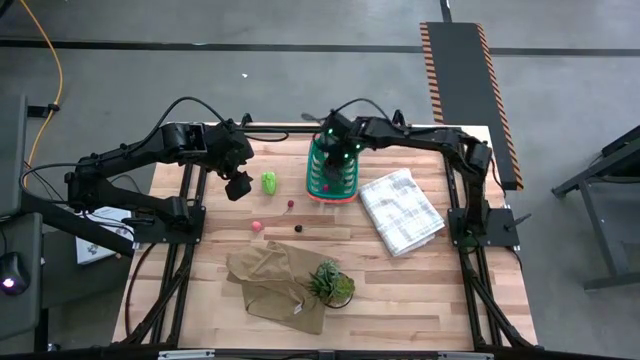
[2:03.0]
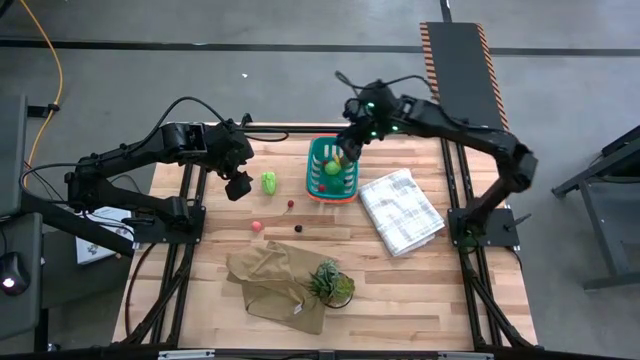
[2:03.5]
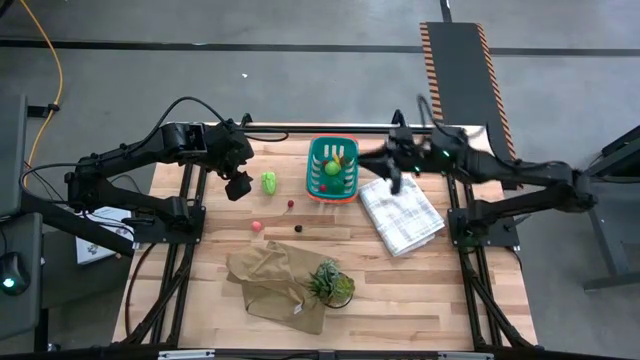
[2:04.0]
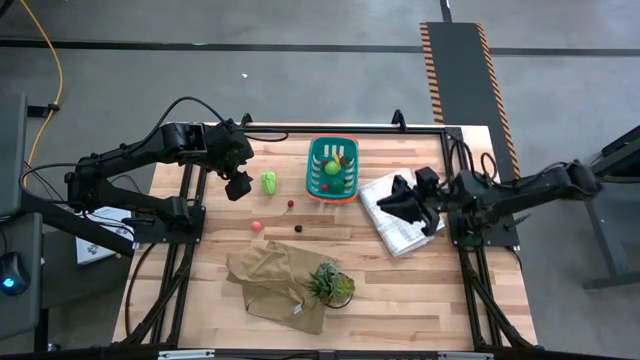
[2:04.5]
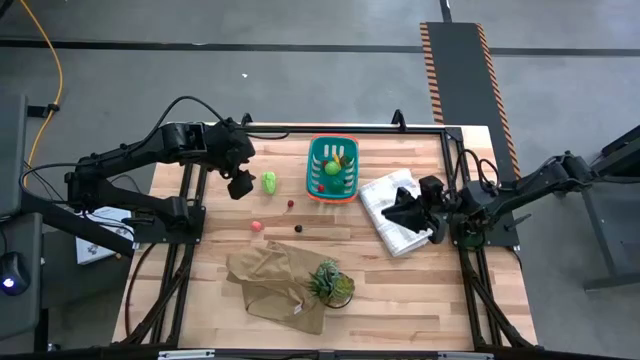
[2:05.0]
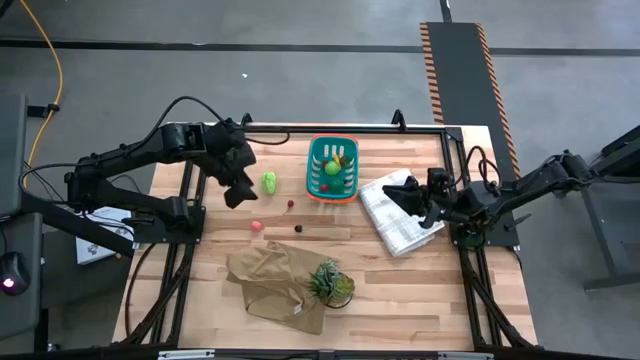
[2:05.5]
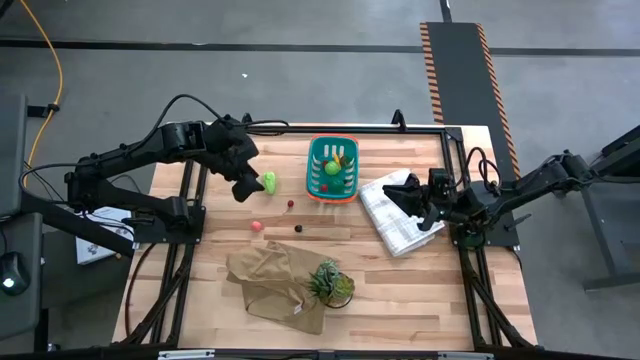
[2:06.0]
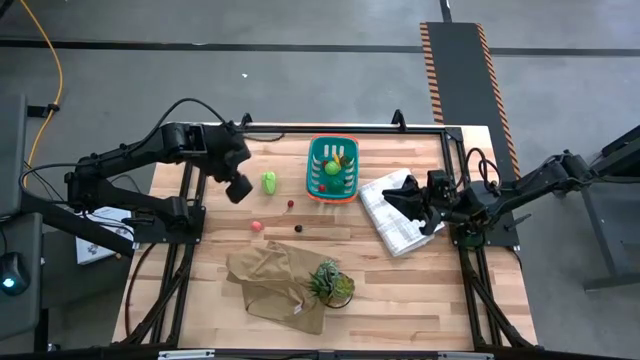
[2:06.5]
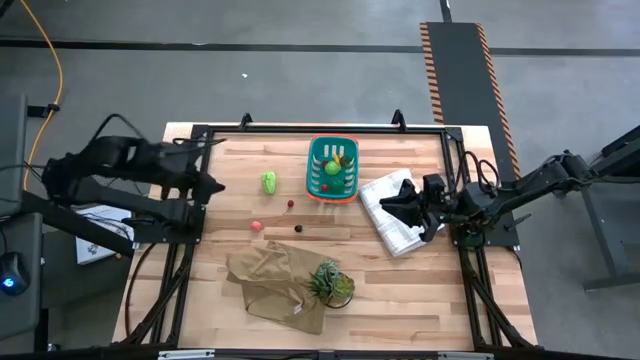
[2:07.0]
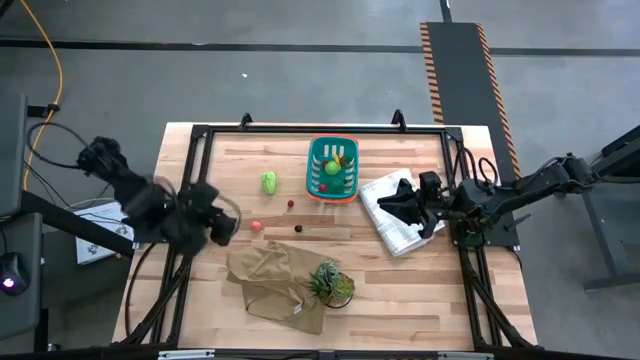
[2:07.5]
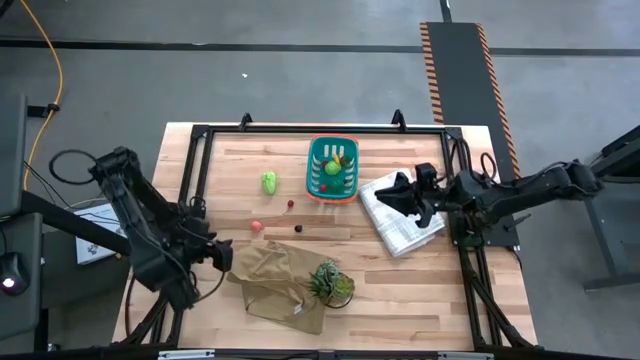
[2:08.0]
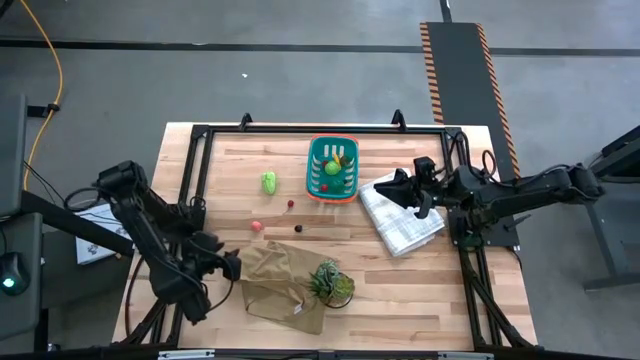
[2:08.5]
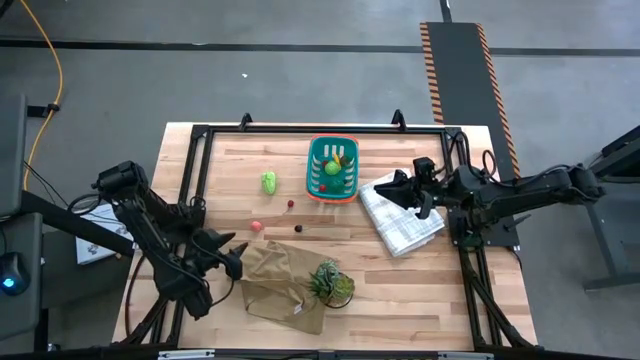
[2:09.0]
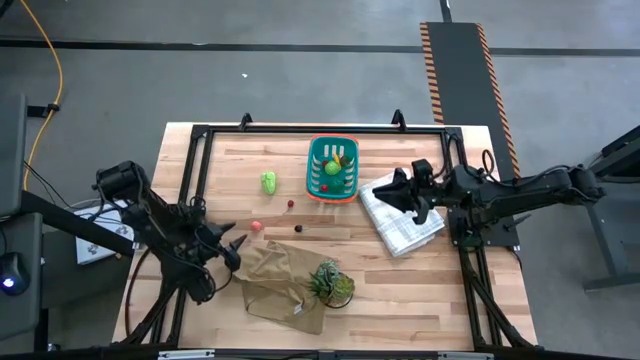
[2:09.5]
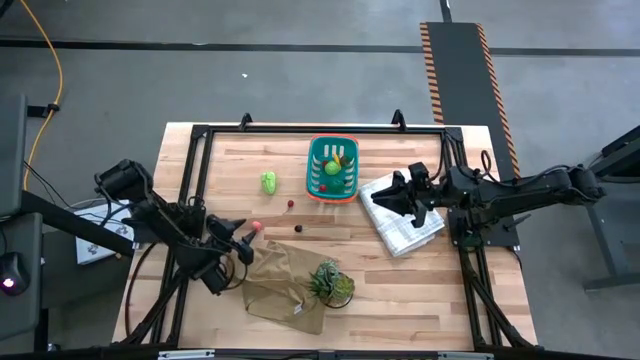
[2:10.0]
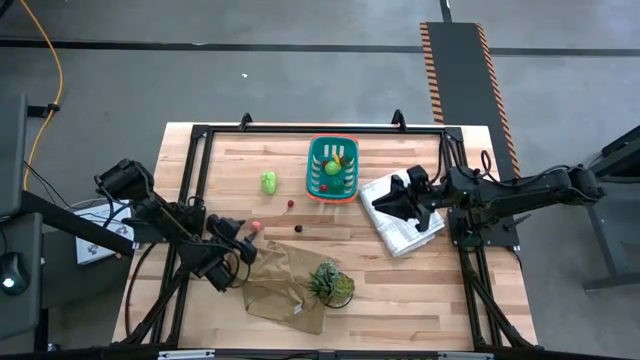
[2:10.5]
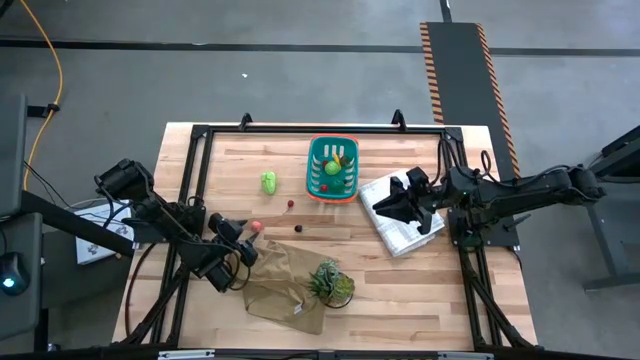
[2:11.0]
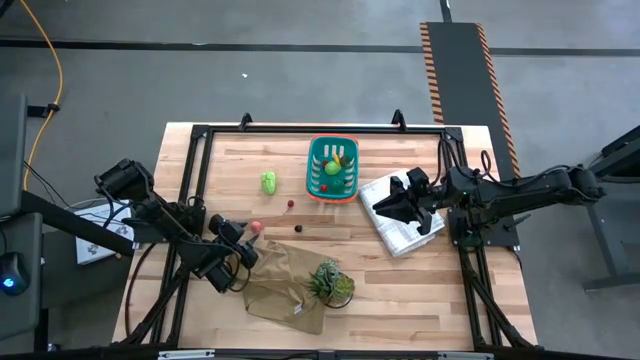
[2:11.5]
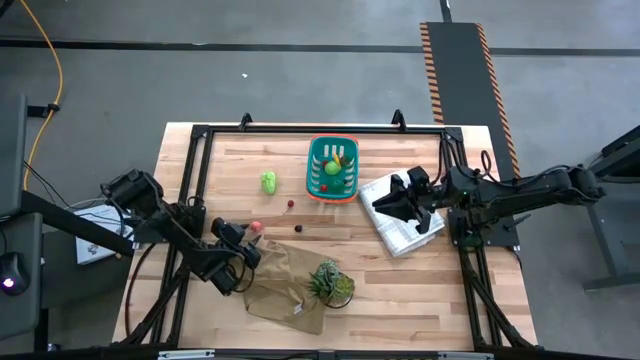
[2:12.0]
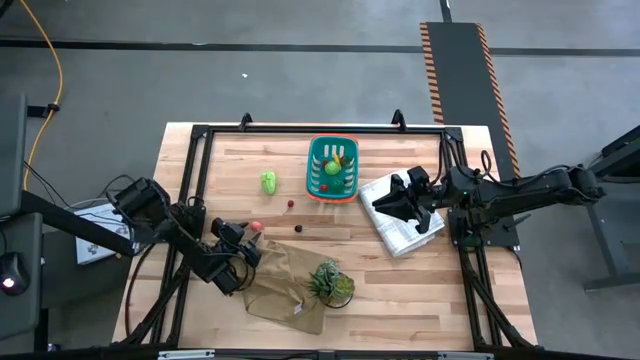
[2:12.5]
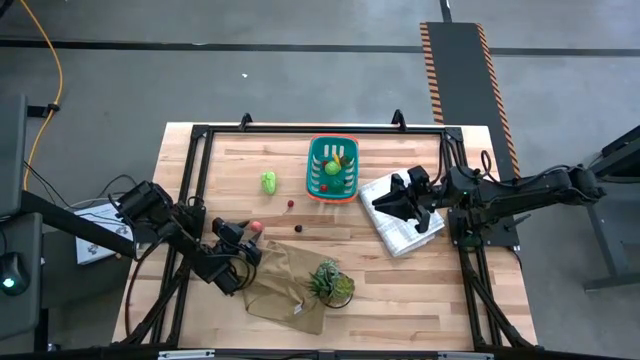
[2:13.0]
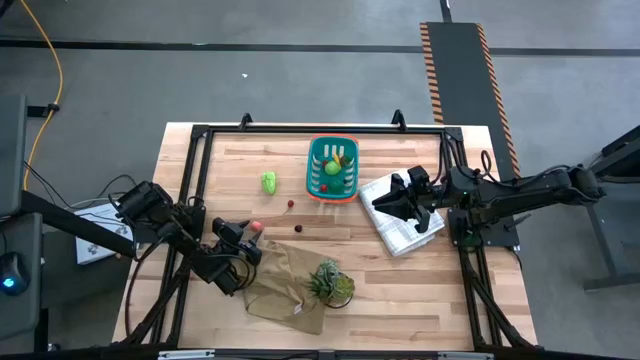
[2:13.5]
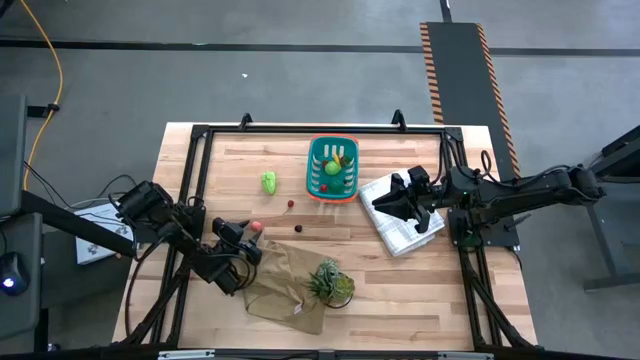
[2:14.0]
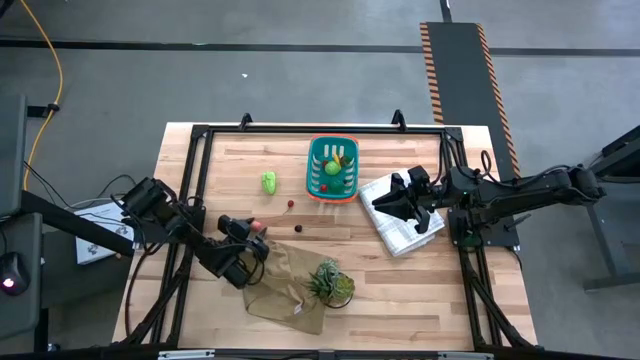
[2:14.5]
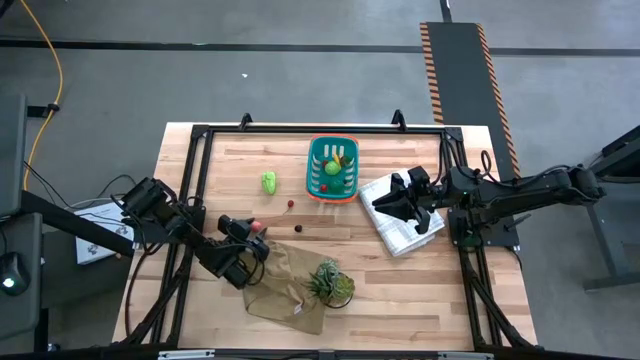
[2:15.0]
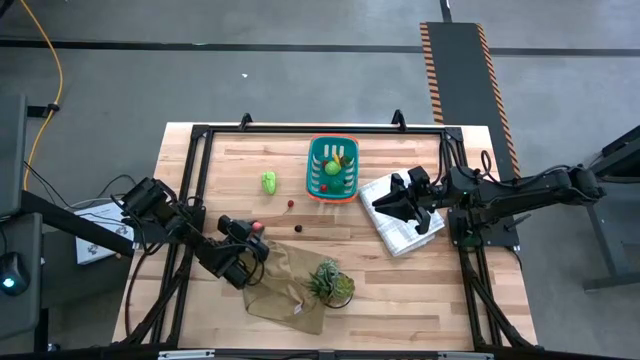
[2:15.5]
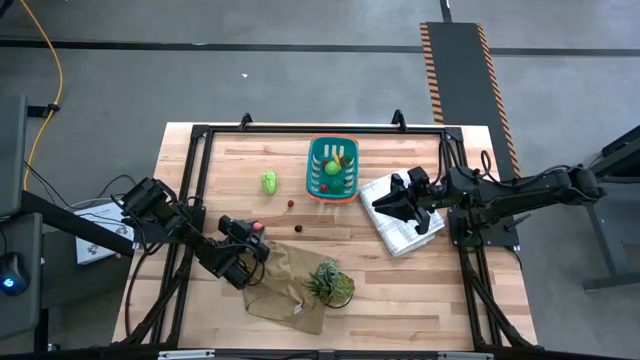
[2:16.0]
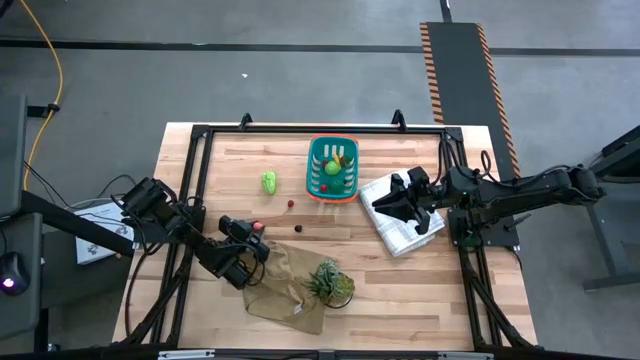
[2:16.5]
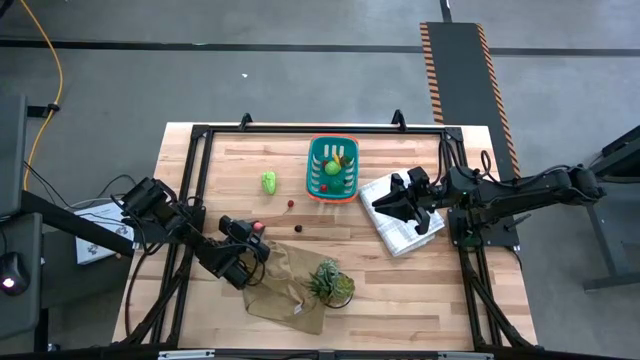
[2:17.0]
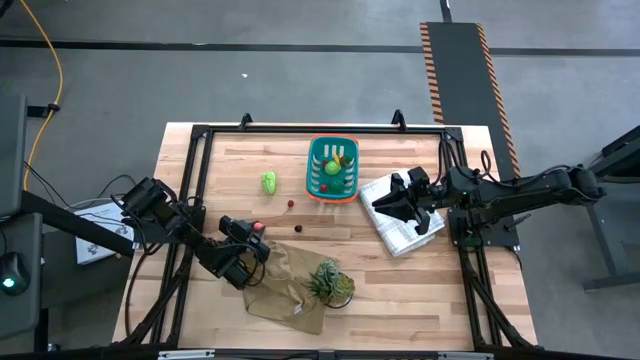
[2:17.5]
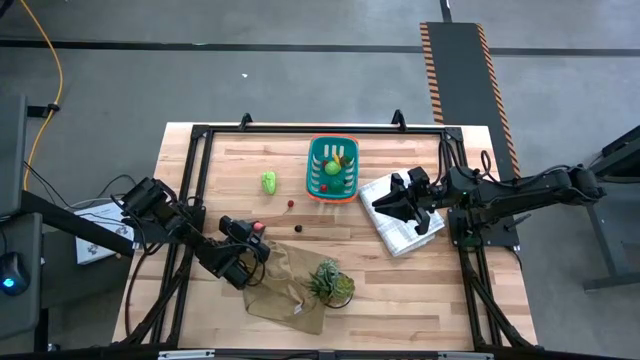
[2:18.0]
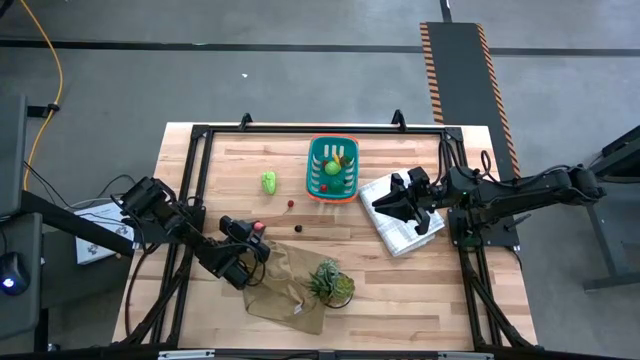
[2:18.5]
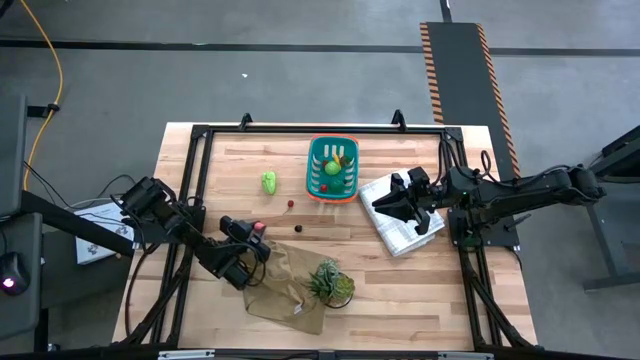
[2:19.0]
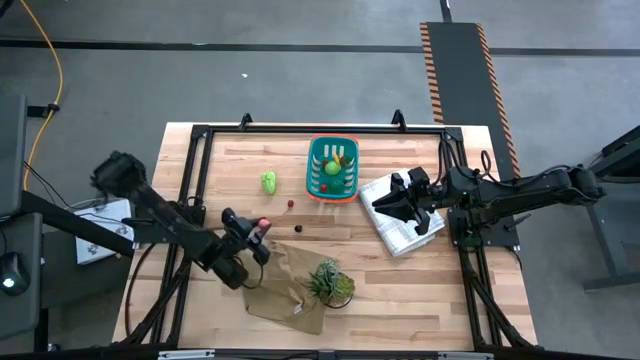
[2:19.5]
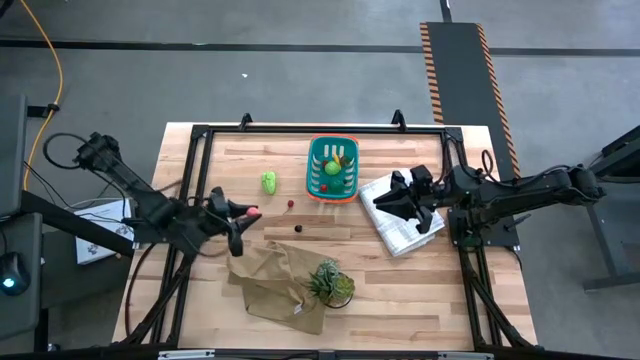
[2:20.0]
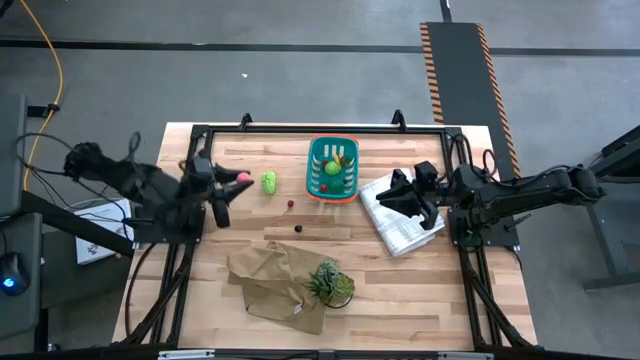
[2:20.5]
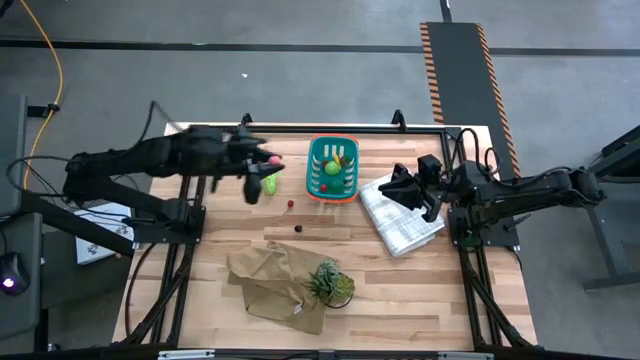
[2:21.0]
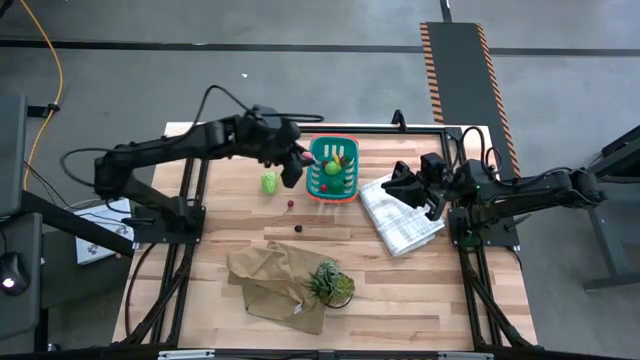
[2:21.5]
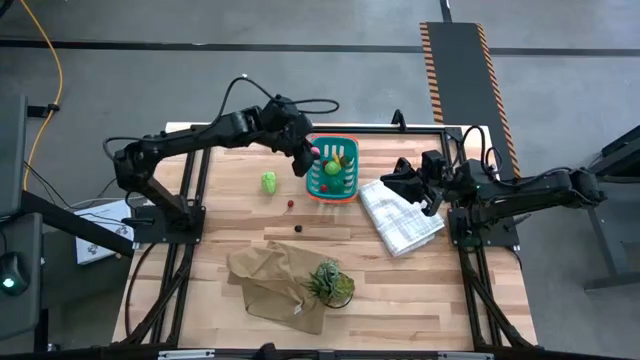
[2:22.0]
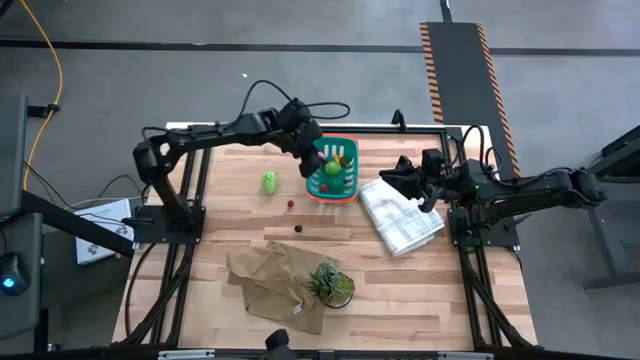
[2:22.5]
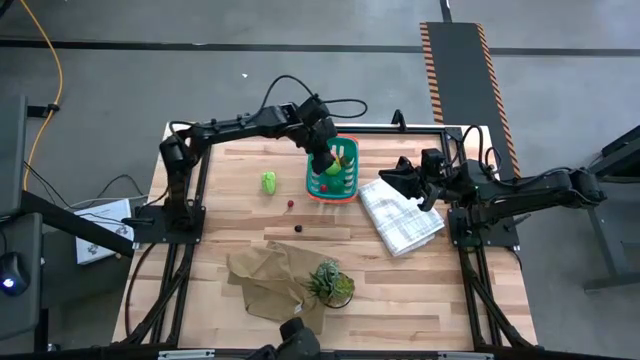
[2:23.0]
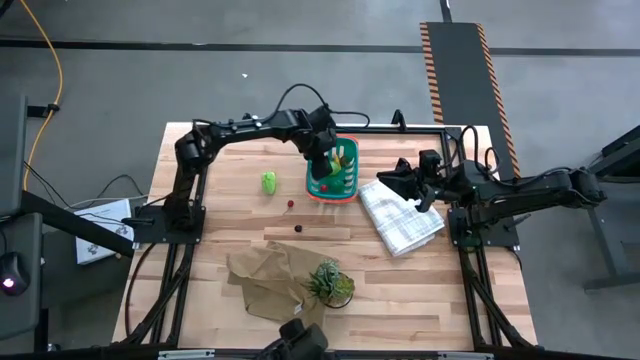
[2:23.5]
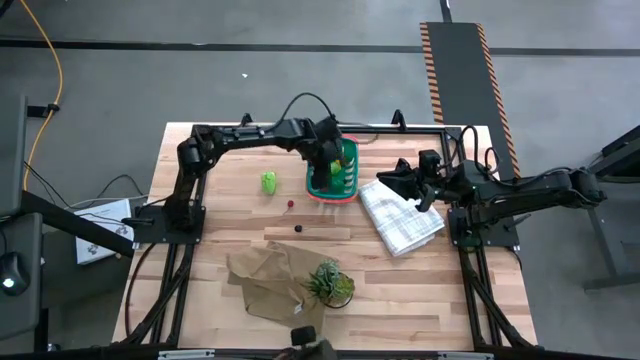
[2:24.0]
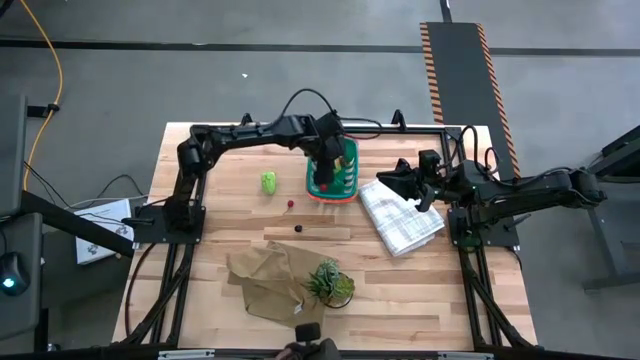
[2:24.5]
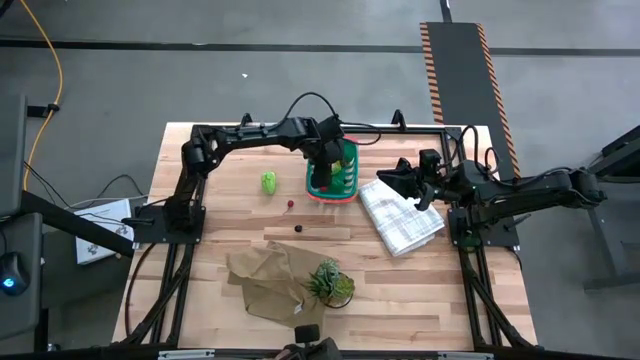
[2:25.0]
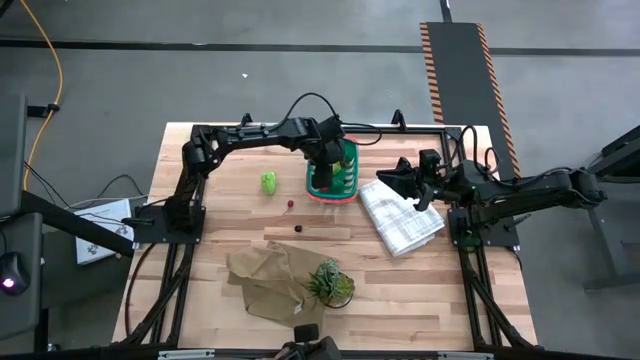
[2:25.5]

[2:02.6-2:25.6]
Task: Pick and placing Produce into tupperware
Put the pink peach into the green basket
